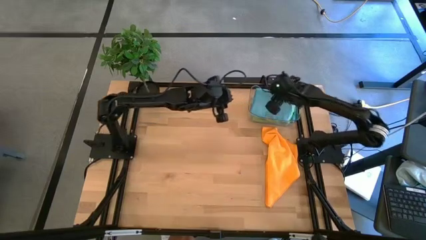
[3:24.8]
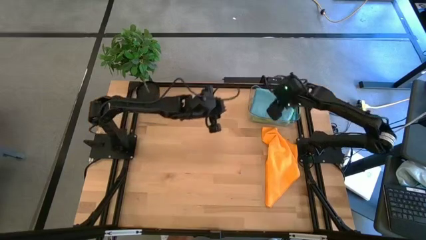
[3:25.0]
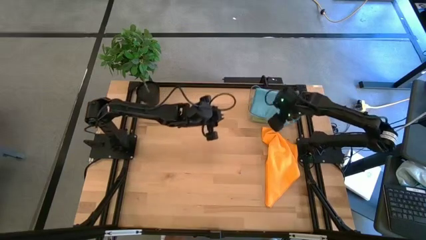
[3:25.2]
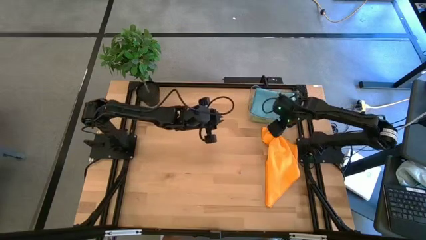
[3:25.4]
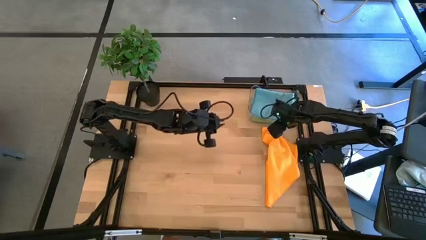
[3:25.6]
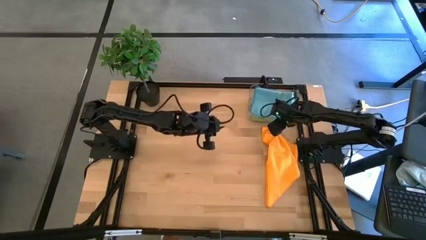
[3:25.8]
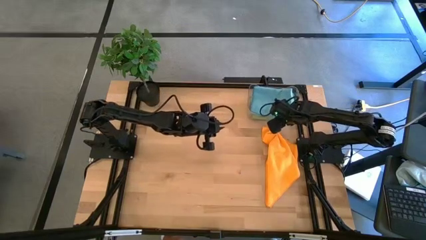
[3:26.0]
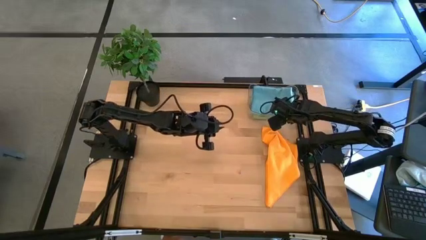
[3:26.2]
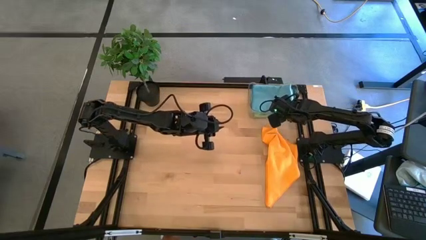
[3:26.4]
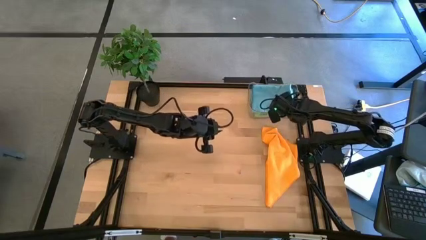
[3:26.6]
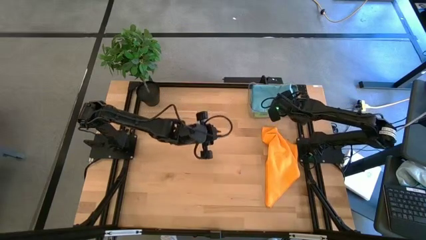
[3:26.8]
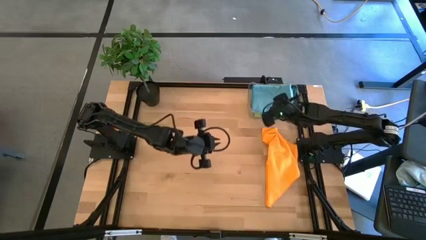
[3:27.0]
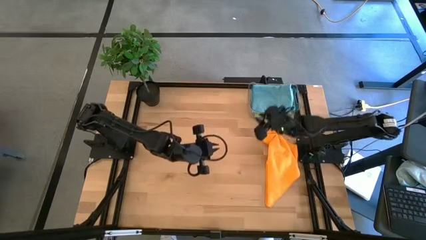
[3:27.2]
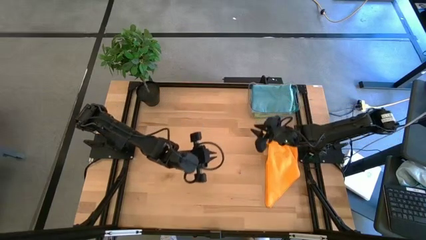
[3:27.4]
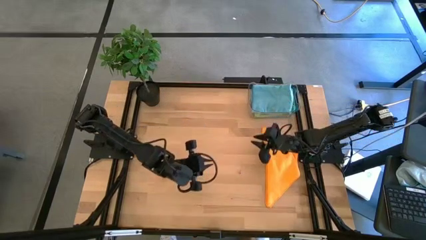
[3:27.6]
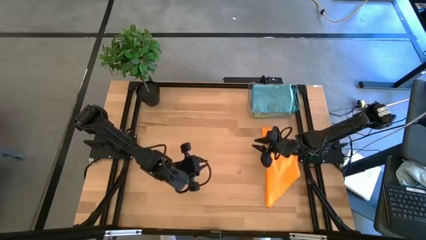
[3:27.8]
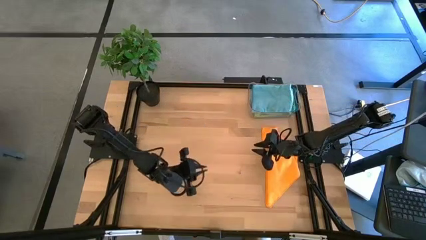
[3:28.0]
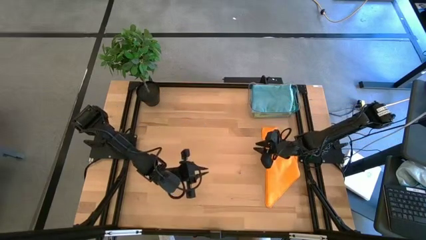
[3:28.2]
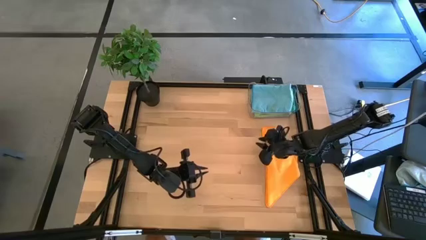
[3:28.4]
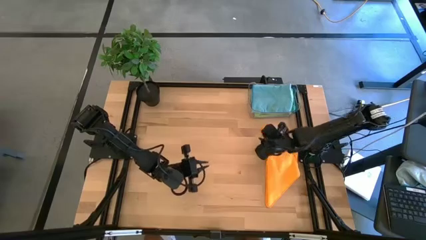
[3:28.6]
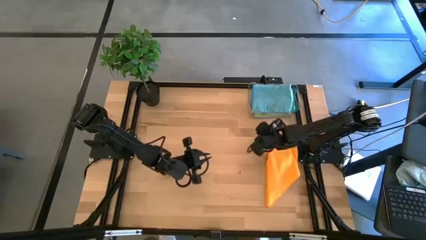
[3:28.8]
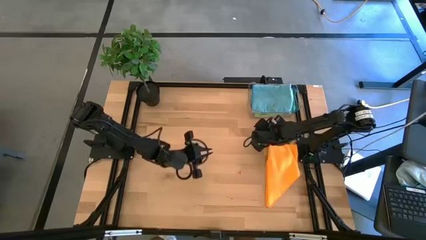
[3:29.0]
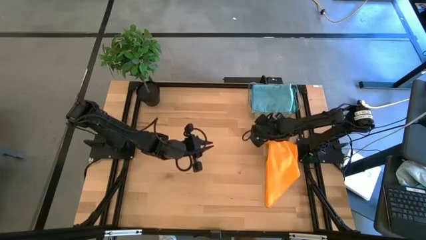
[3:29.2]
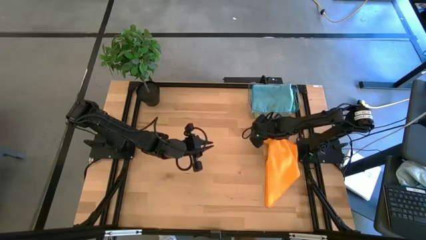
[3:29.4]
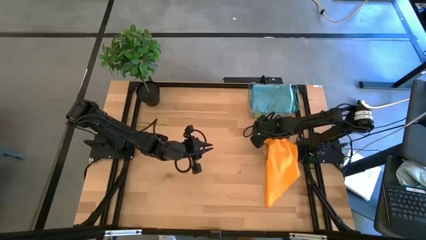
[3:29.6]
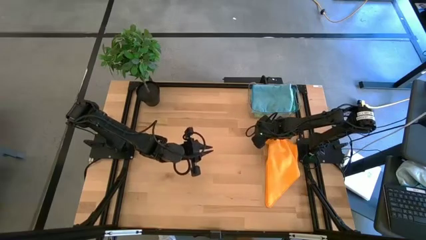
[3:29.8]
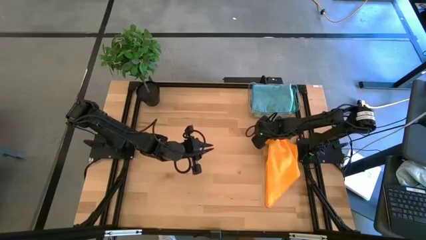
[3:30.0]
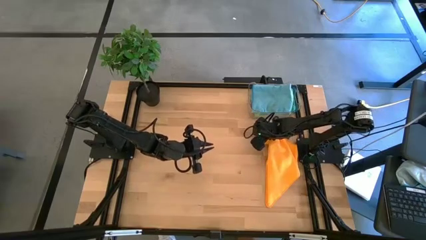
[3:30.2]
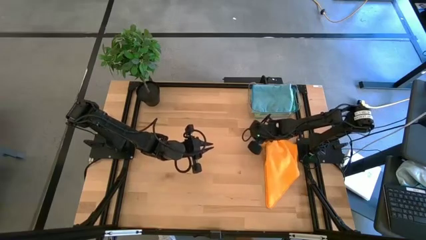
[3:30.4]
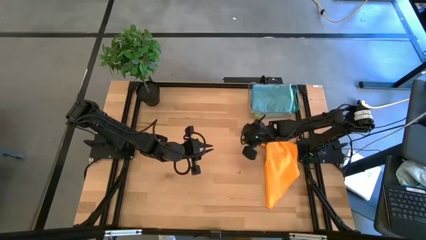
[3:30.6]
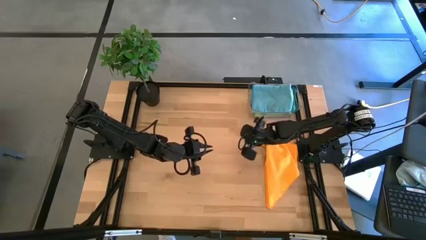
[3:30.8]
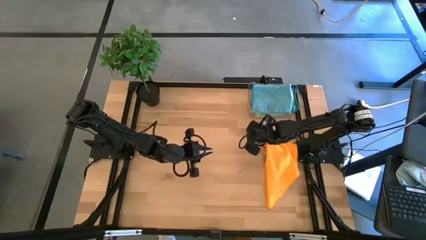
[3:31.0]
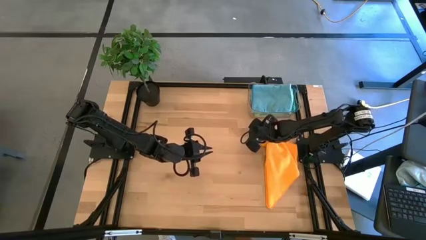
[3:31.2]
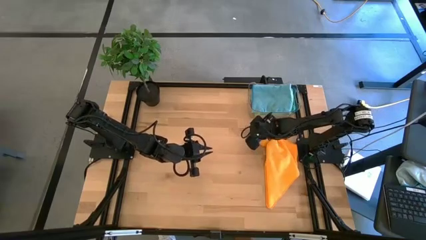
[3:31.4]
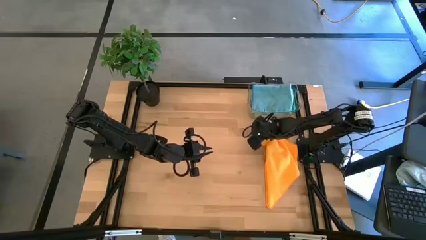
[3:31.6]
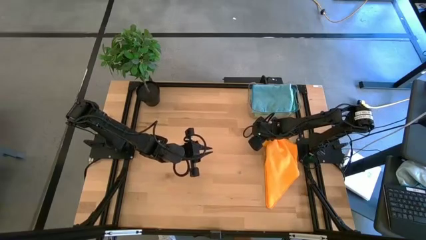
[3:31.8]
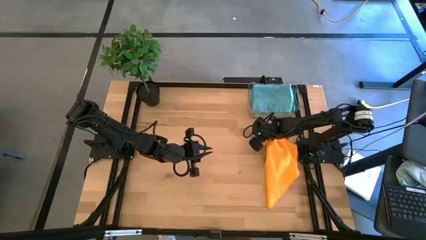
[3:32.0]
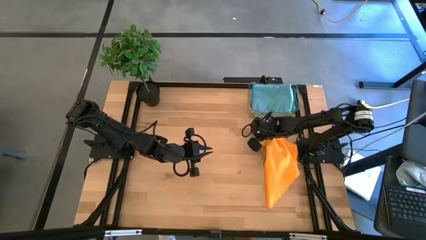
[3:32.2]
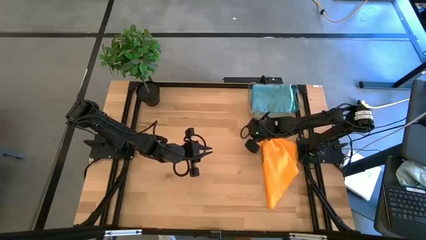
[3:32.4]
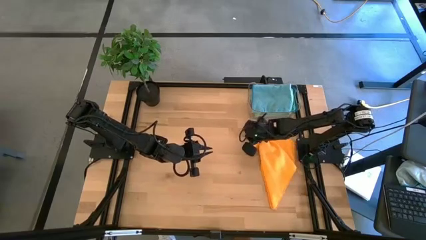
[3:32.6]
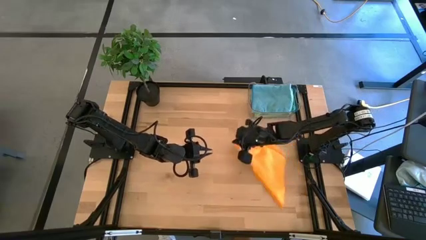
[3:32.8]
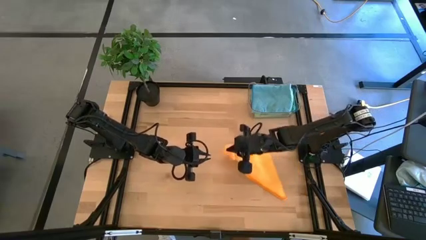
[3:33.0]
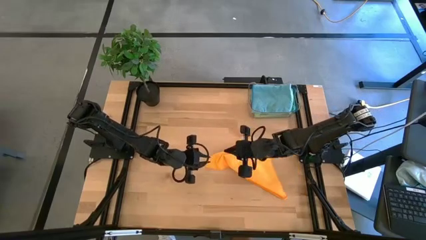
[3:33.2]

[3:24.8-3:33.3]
Task: Fold microfiber towels
Fold the orange microfiber towel

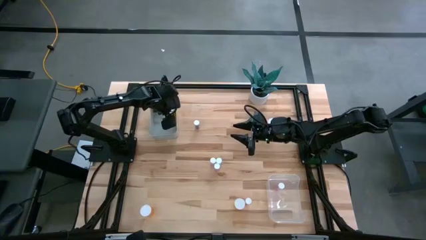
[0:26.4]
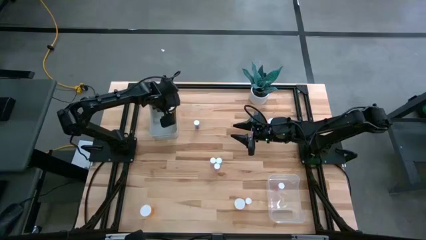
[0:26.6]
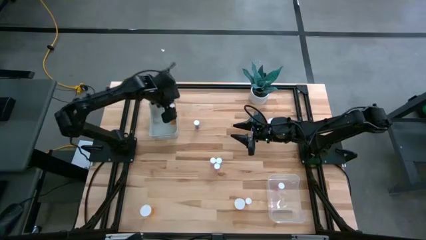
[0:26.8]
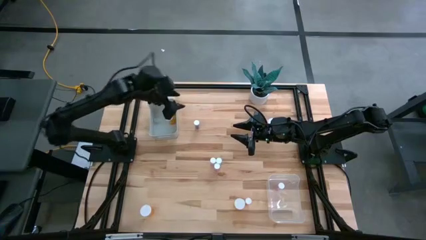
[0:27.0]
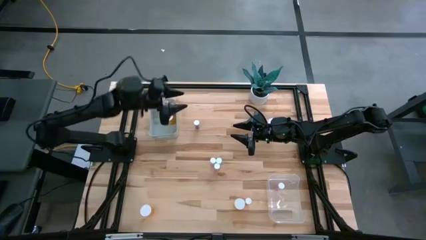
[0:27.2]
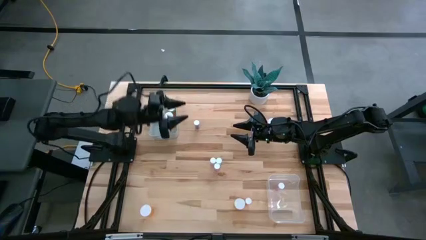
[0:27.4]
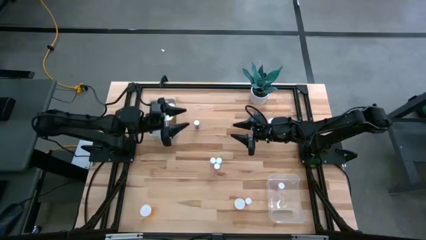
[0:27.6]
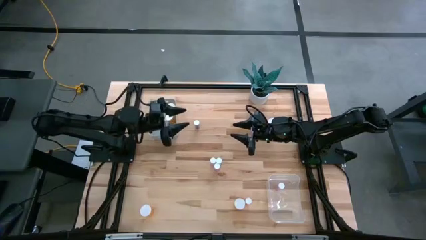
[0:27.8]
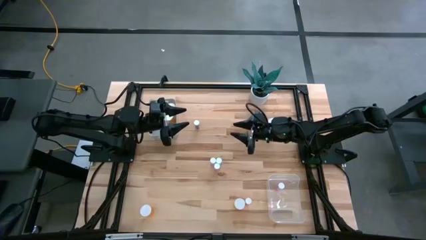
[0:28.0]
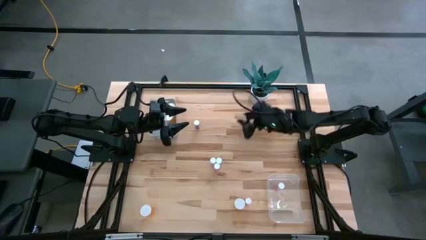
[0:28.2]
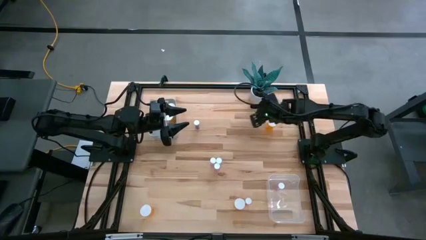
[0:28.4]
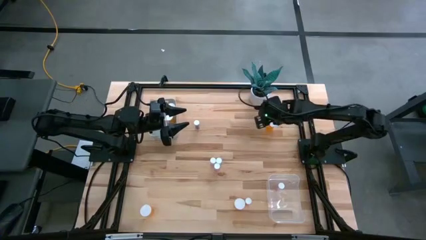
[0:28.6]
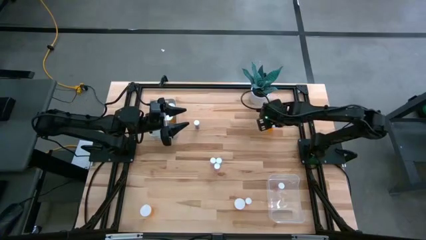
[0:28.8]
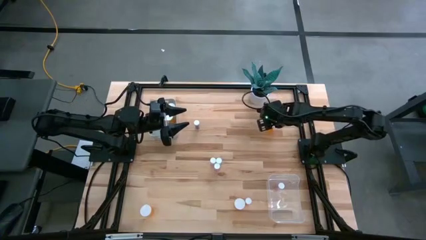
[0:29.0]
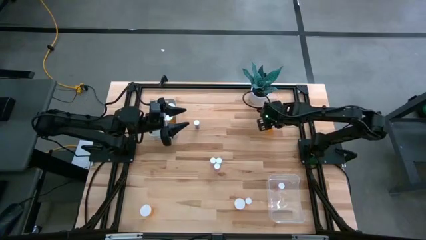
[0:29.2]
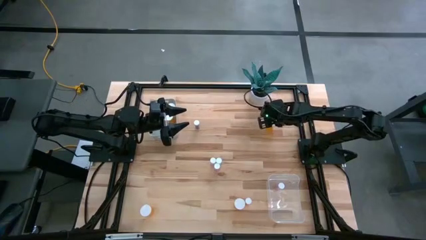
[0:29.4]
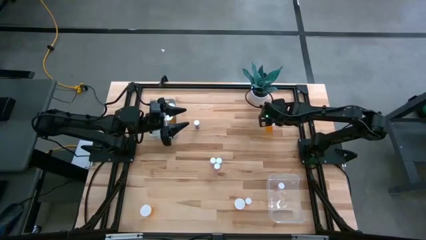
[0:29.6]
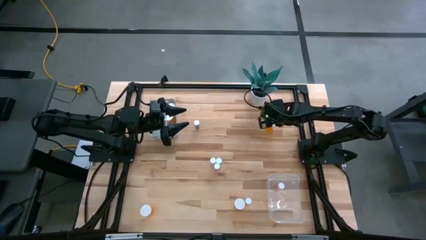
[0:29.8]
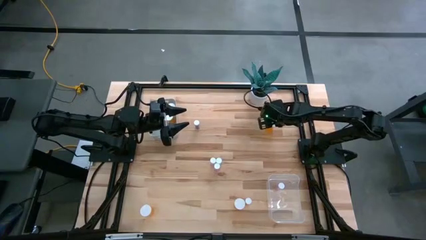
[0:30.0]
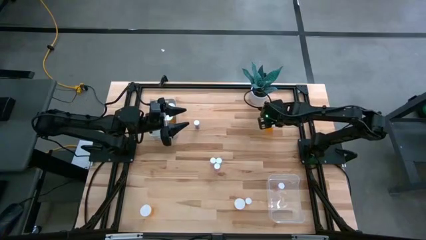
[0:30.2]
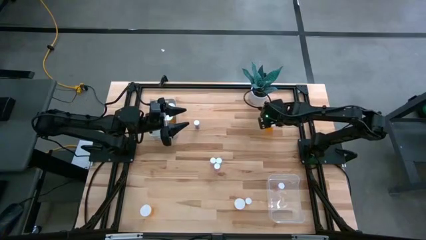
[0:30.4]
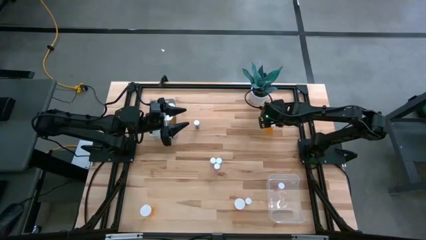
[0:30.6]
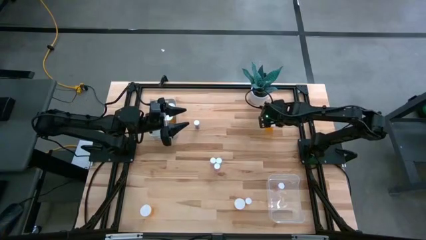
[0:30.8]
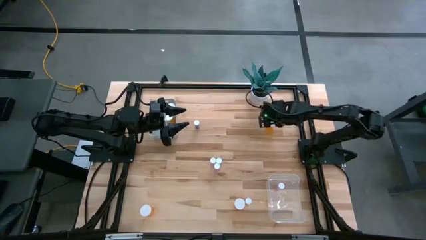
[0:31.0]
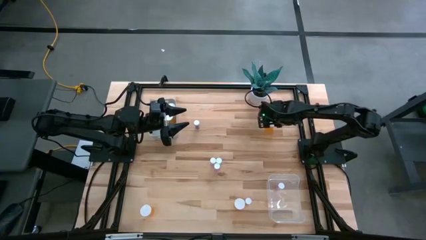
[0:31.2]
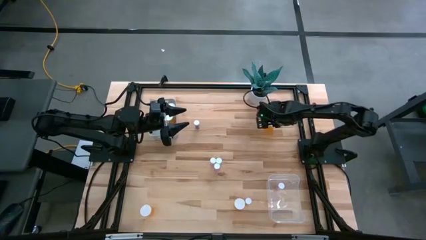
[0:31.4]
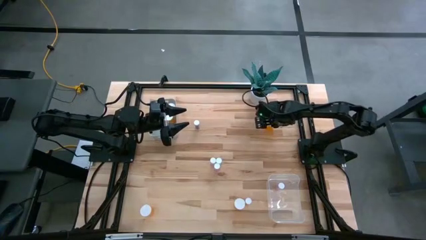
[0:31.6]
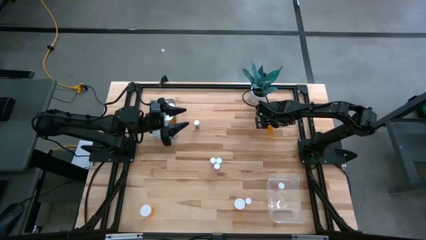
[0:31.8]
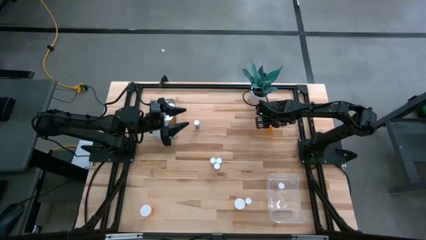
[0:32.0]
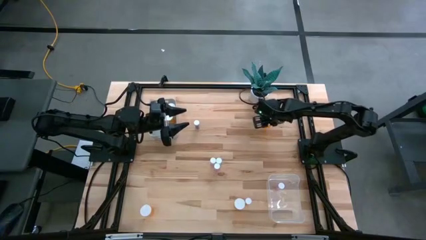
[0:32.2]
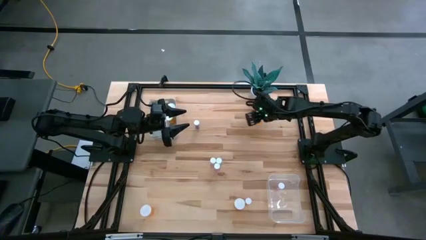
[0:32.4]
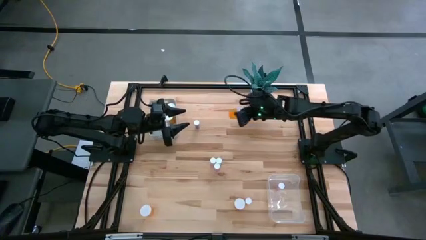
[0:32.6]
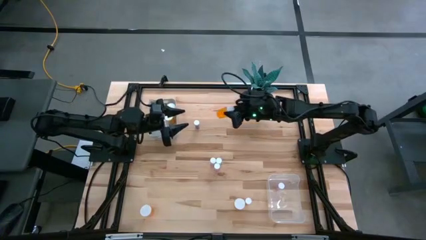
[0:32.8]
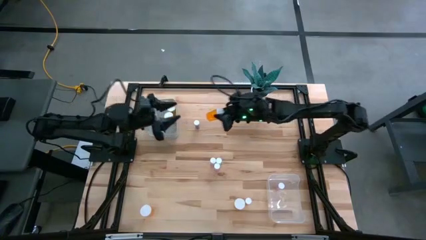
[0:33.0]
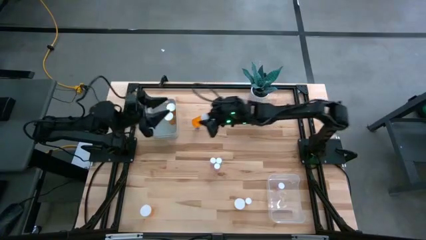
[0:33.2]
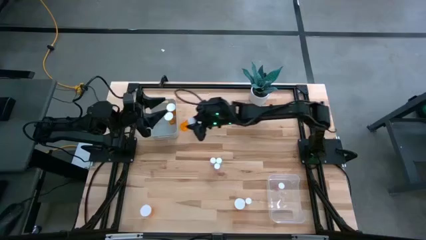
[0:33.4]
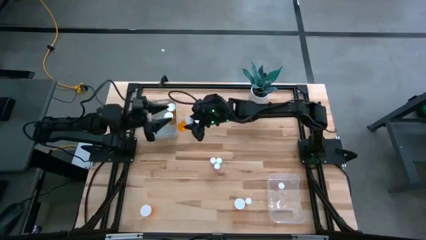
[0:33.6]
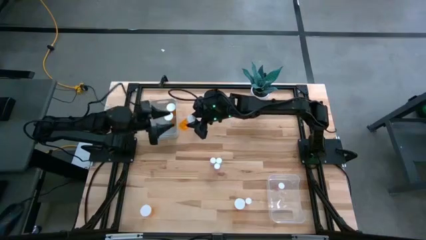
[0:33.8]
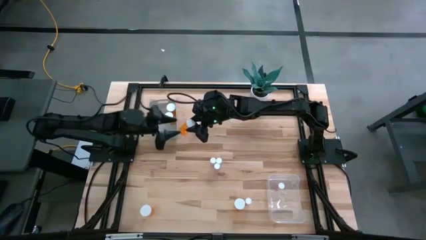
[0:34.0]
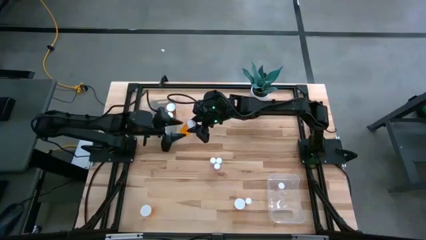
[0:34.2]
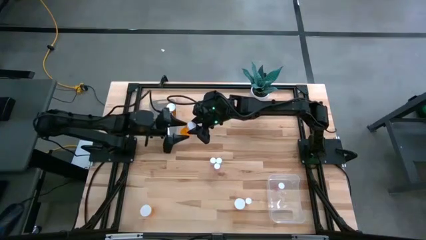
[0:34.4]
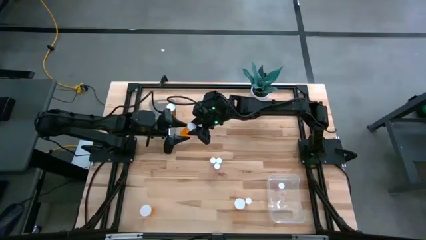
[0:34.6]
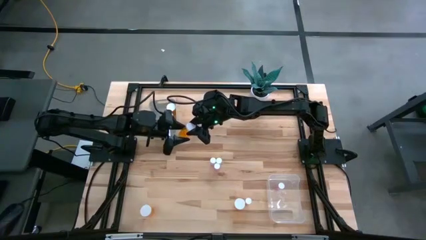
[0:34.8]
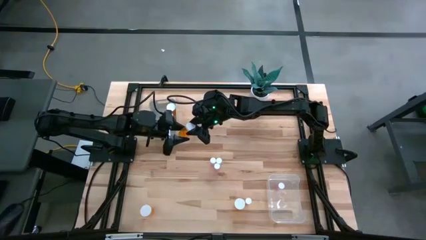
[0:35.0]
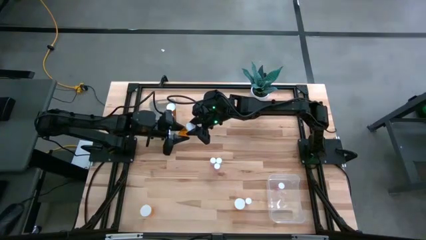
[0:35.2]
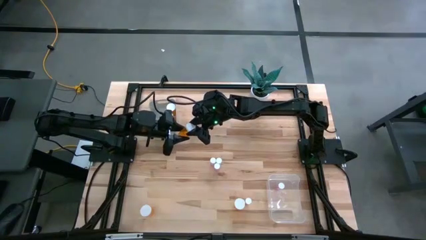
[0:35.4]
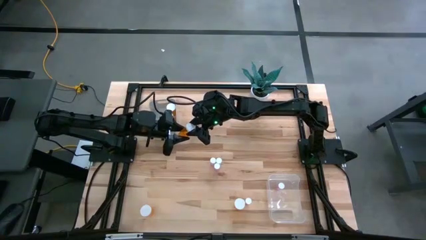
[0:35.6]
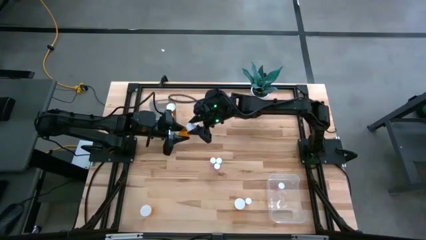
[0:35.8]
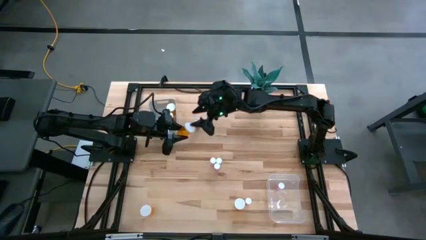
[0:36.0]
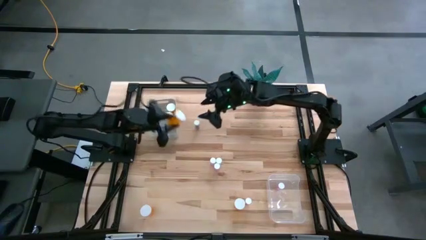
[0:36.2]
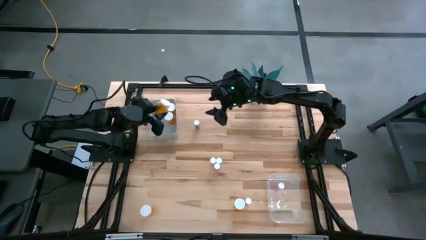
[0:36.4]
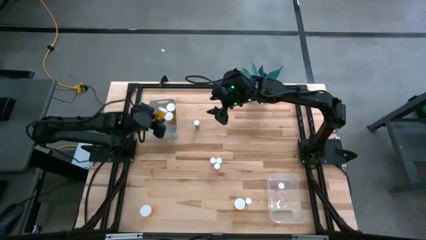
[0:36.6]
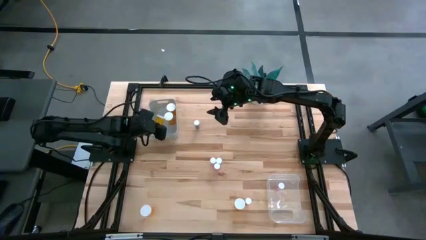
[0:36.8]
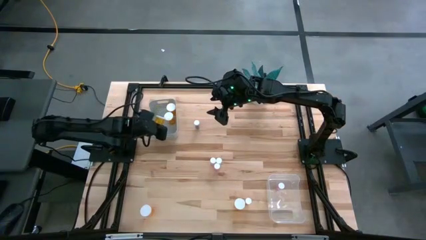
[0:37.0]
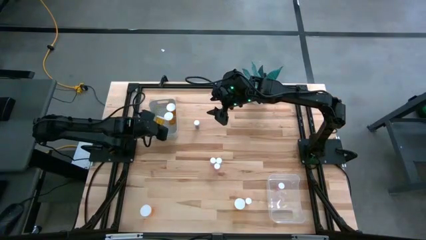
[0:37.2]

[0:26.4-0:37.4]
Task: Pick and place medicine bottles into bin by pill shape (circle, oval)
Put the top orange capsule bottle into the gray bin
